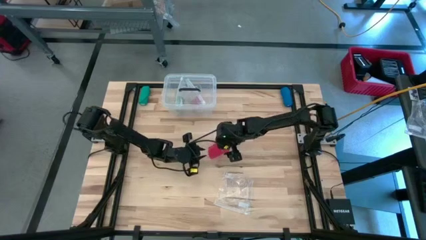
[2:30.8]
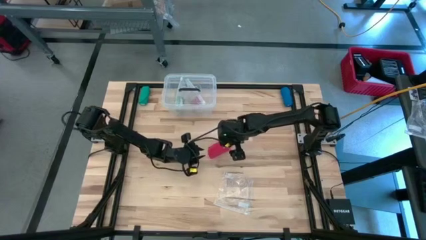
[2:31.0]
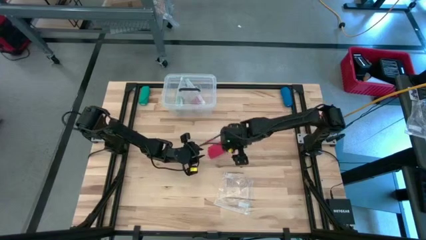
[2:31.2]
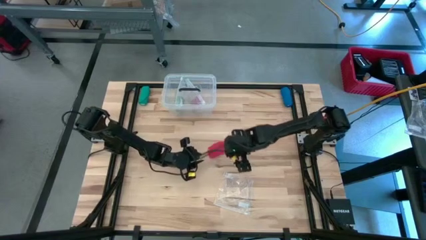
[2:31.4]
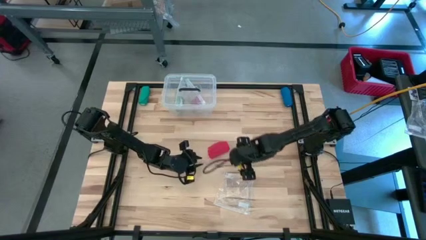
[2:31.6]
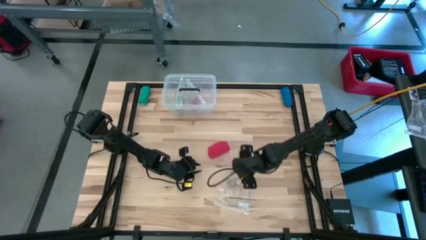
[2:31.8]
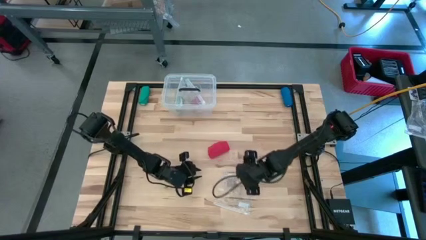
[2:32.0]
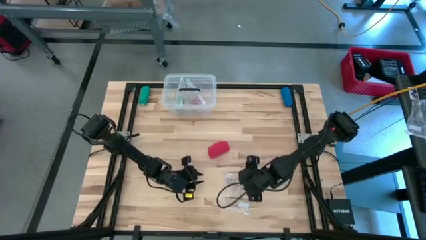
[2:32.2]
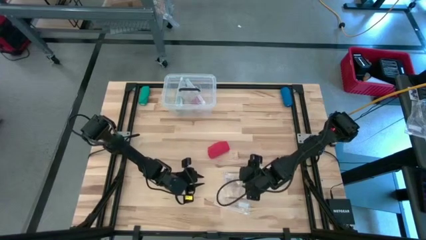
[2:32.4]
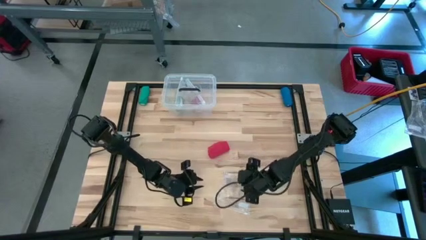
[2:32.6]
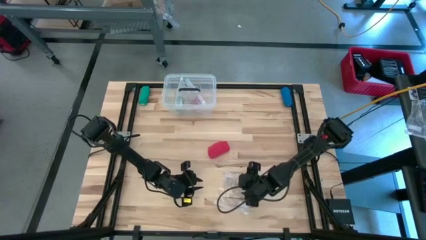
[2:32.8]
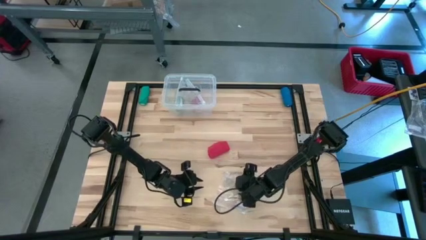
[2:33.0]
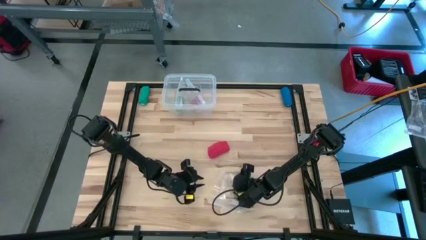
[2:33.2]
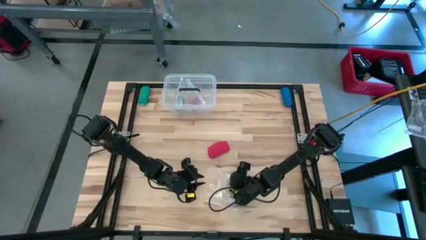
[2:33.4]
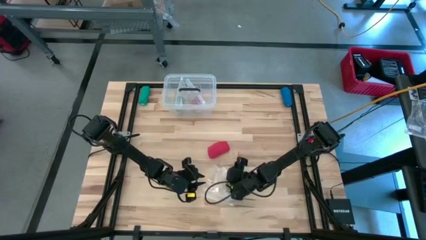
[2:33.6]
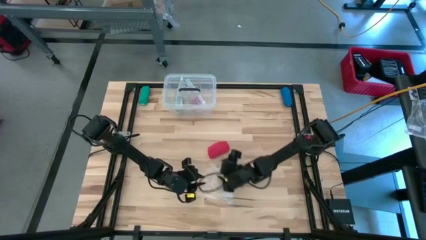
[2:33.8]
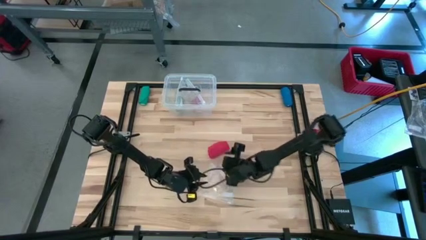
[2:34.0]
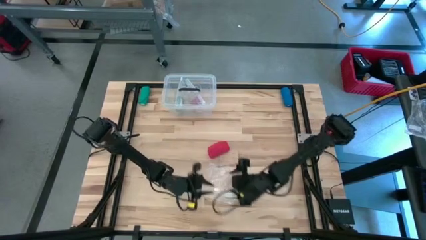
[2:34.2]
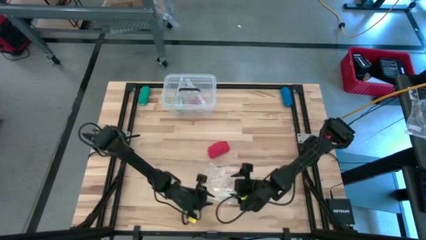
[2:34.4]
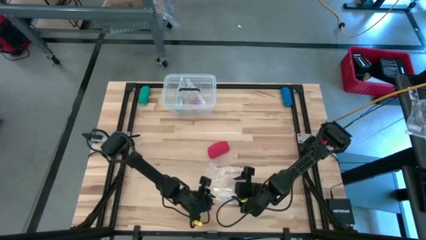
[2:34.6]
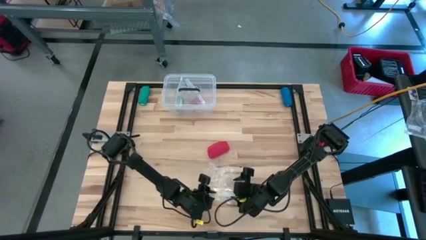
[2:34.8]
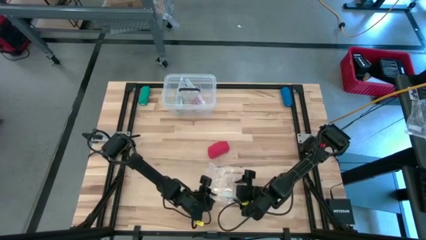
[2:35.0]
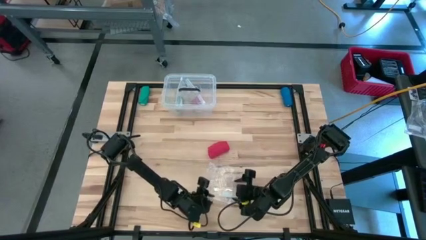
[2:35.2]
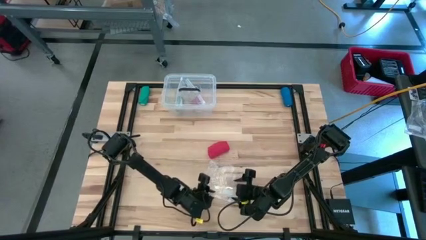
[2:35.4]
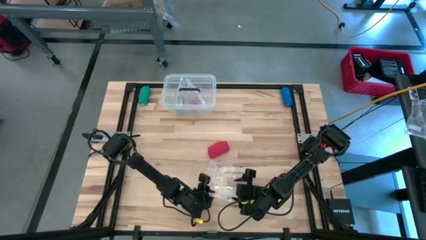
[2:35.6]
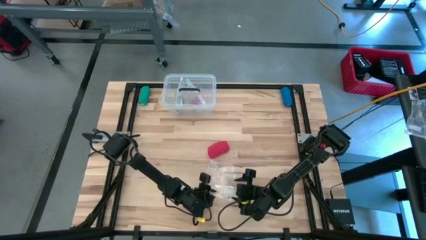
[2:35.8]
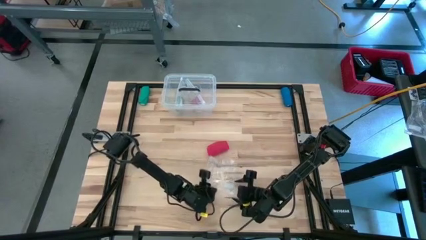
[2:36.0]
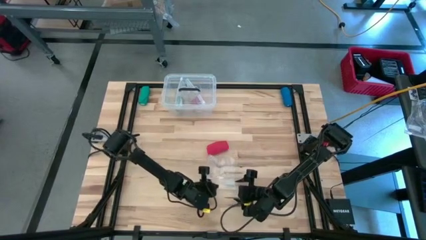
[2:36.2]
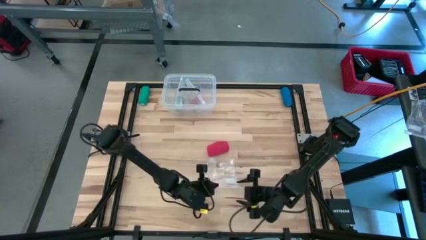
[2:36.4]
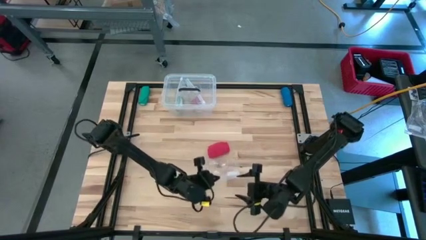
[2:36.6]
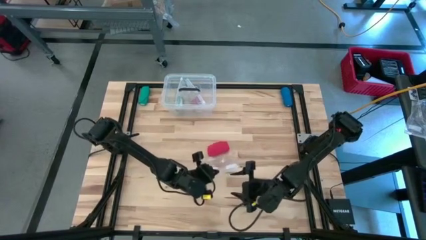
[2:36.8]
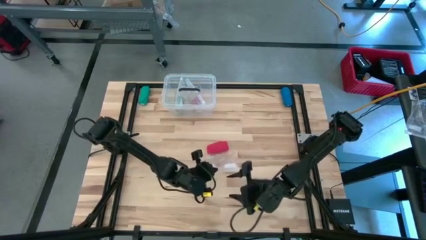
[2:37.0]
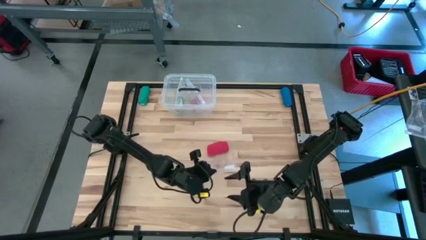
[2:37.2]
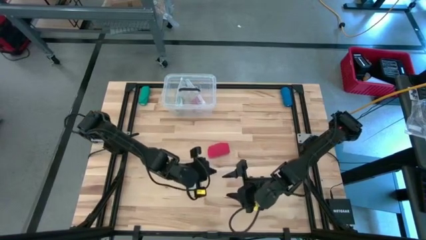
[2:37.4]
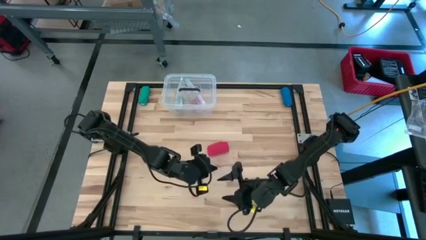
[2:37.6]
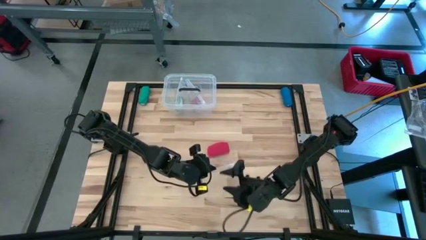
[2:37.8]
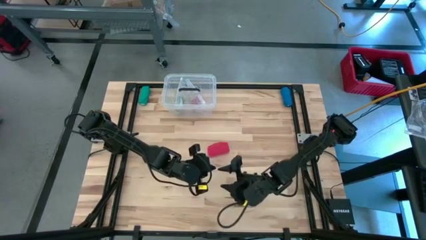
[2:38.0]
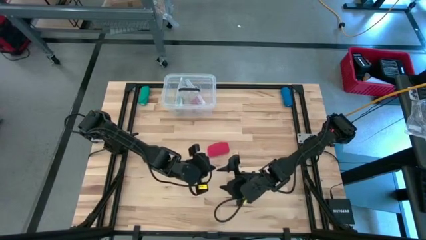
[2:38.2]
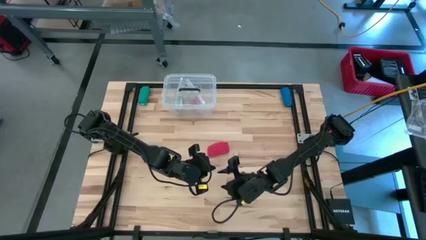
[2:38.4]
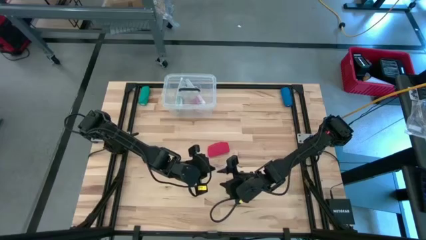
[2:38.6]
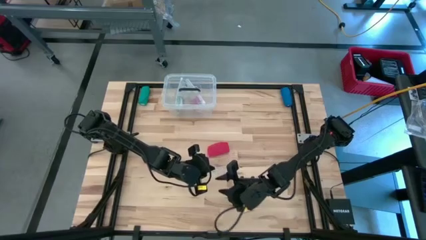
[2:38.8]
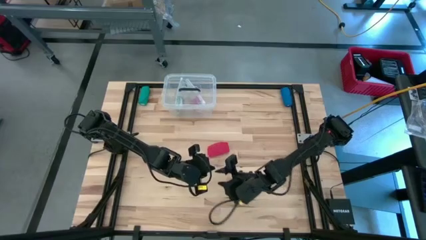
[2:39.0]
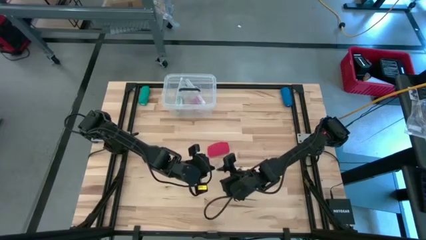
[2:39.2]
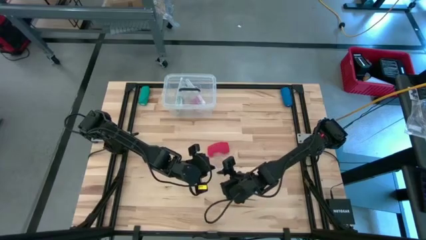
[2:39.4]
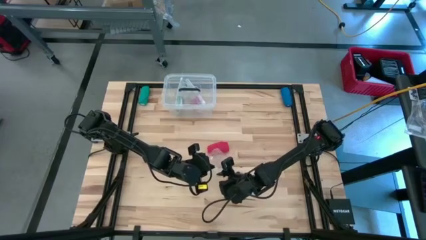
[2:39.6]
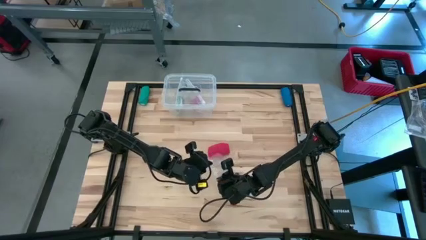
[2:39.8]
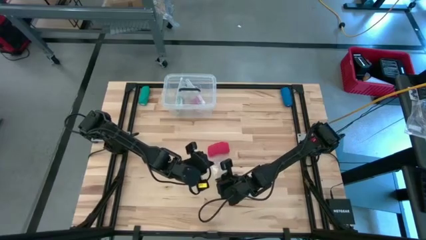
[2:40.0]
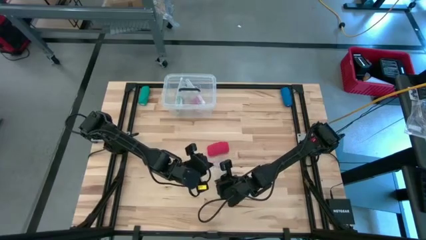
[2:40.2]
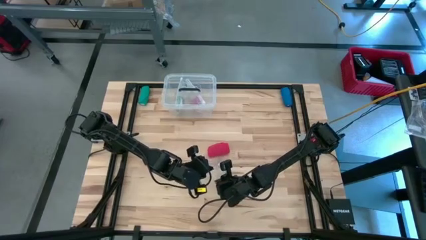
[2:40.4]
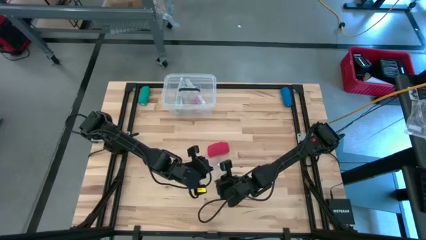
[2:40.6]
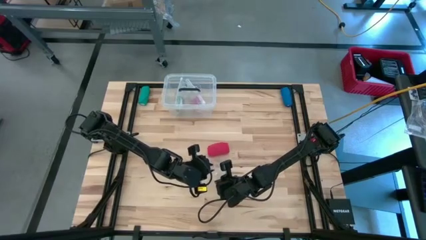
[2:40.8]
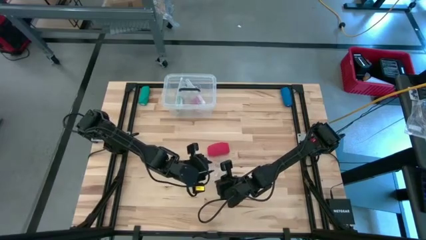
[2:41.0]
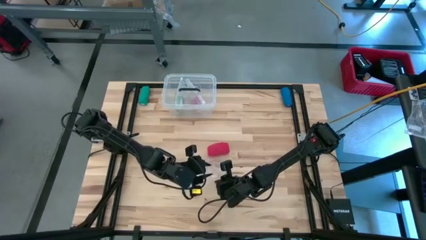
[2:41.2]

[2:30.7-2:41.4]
Task: Roll bandage
Put the red bandage into the zip bag
